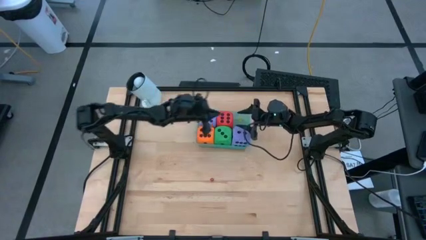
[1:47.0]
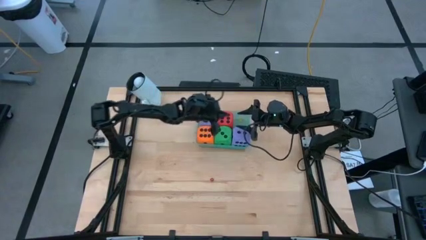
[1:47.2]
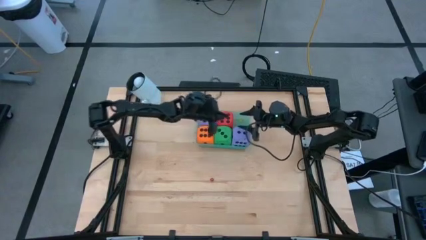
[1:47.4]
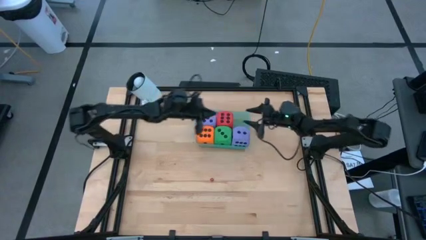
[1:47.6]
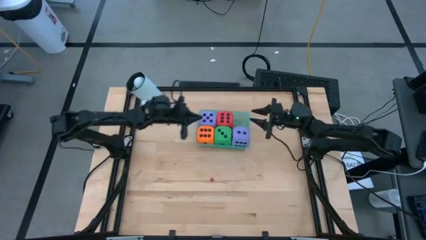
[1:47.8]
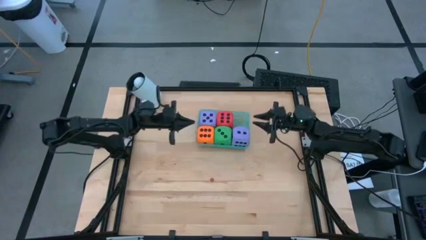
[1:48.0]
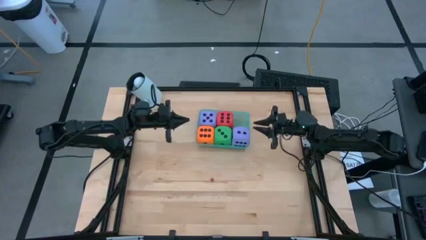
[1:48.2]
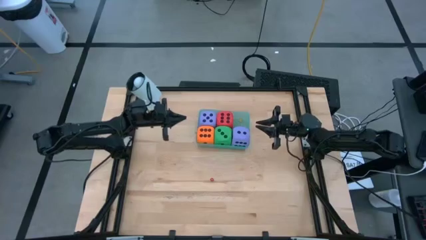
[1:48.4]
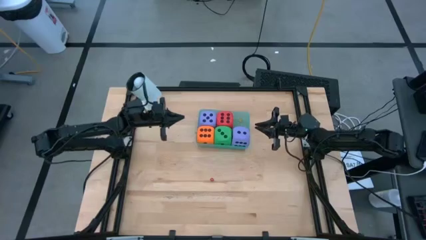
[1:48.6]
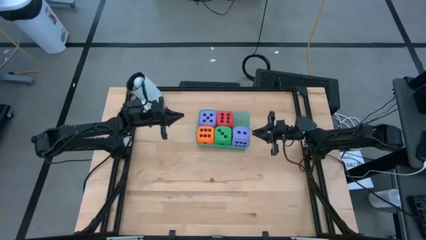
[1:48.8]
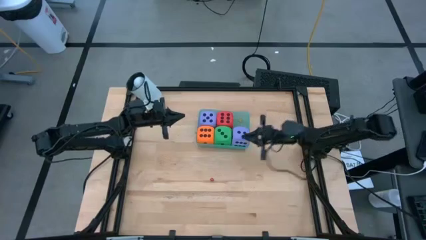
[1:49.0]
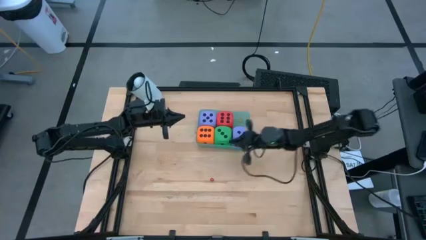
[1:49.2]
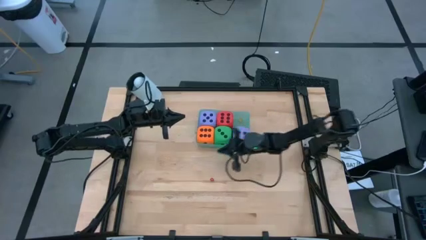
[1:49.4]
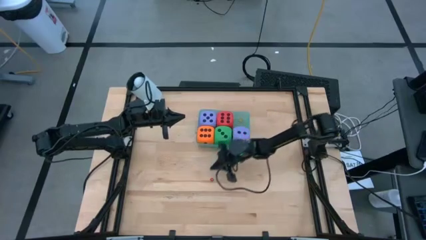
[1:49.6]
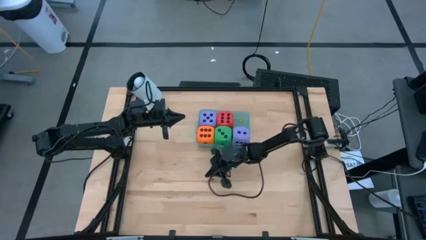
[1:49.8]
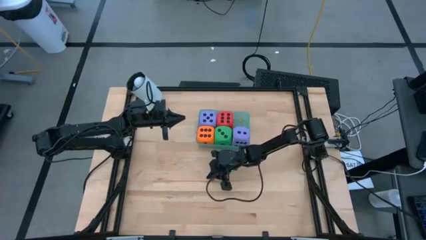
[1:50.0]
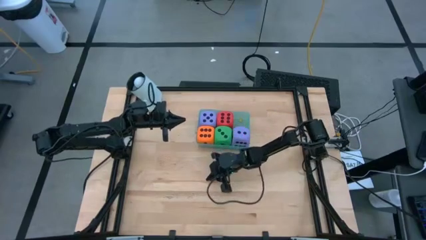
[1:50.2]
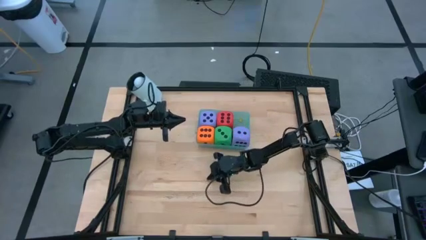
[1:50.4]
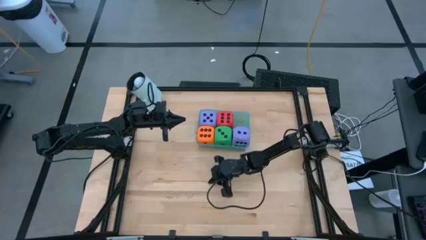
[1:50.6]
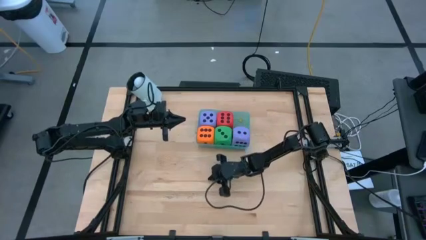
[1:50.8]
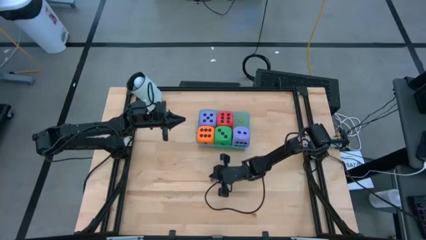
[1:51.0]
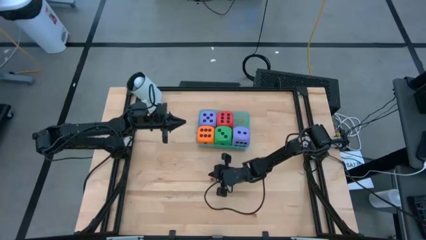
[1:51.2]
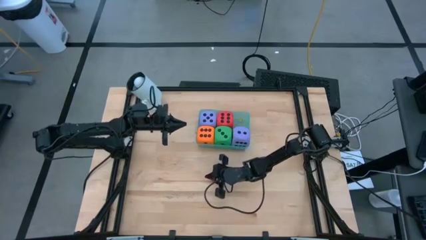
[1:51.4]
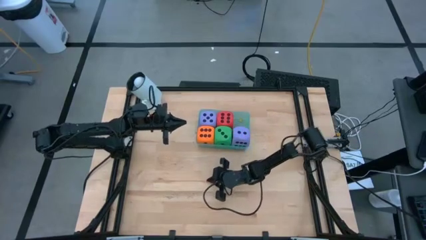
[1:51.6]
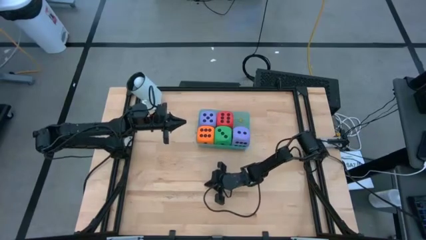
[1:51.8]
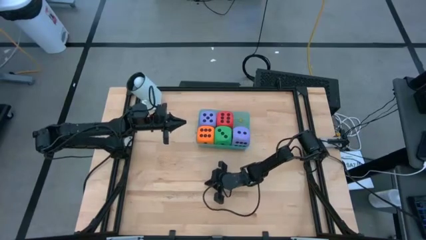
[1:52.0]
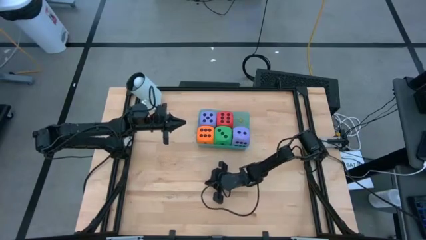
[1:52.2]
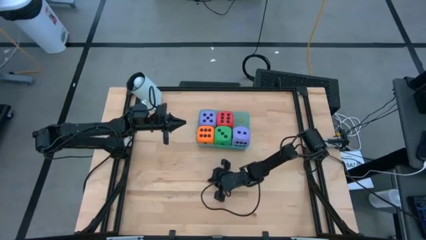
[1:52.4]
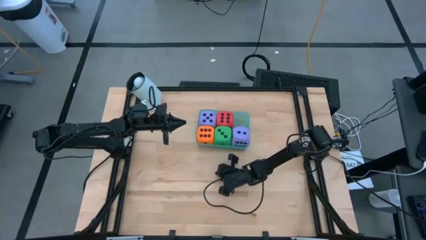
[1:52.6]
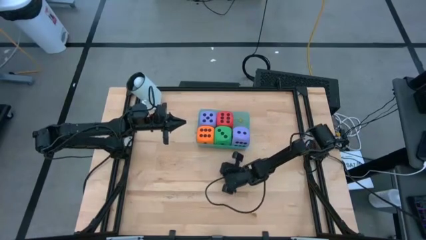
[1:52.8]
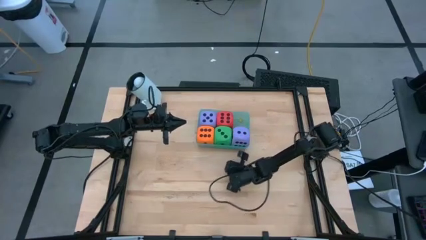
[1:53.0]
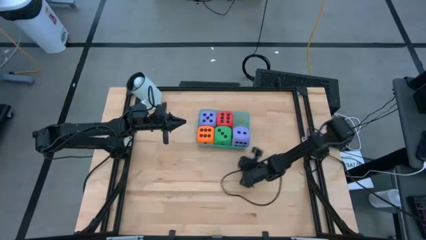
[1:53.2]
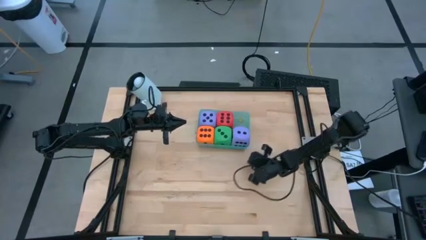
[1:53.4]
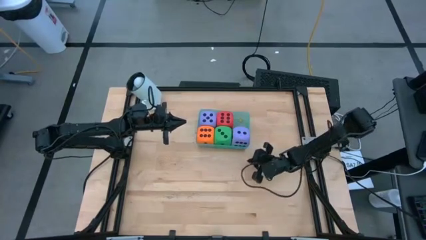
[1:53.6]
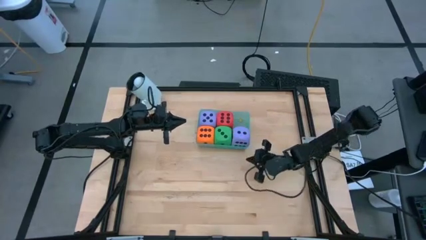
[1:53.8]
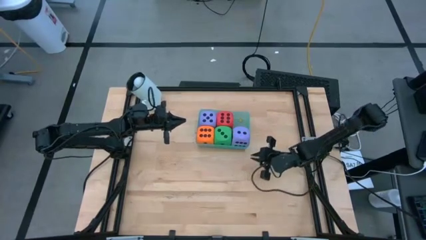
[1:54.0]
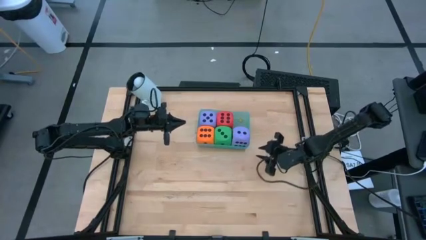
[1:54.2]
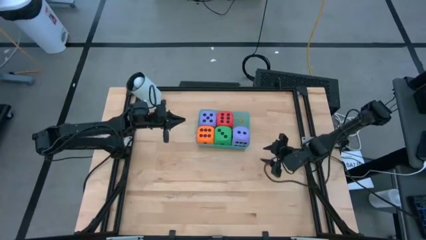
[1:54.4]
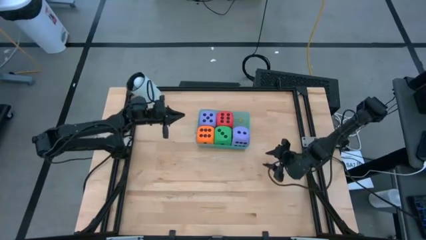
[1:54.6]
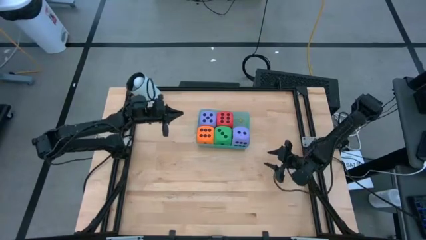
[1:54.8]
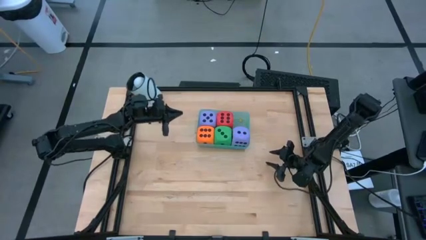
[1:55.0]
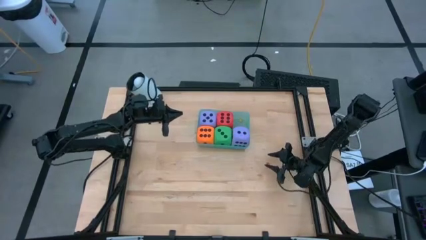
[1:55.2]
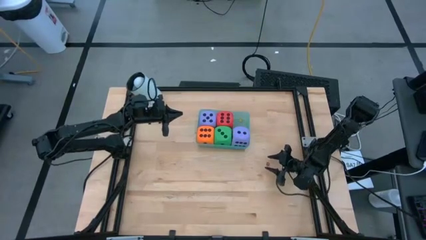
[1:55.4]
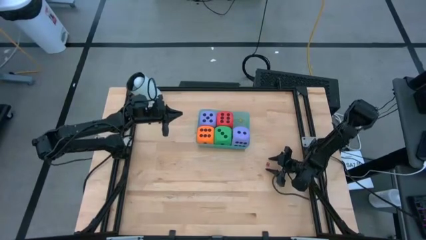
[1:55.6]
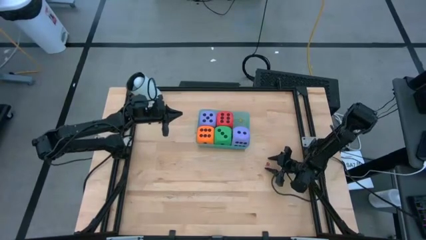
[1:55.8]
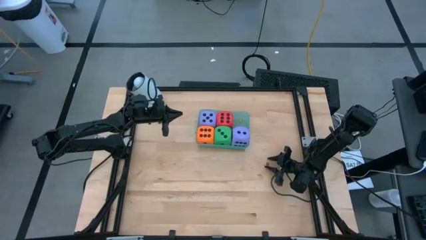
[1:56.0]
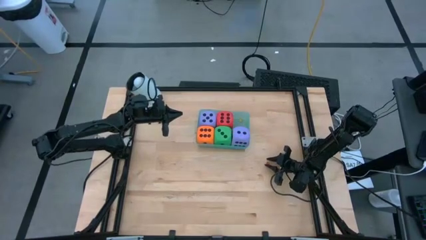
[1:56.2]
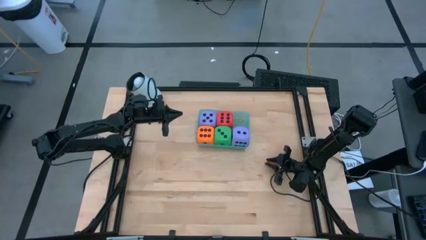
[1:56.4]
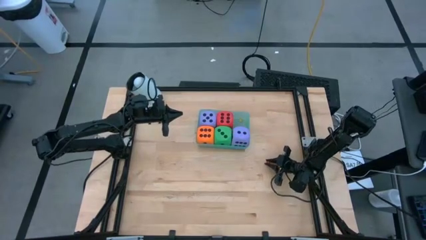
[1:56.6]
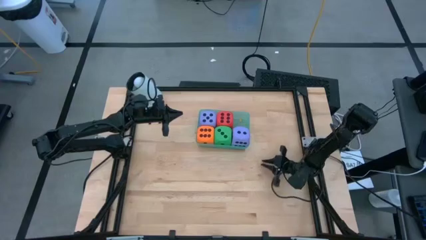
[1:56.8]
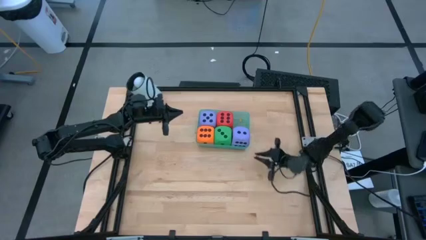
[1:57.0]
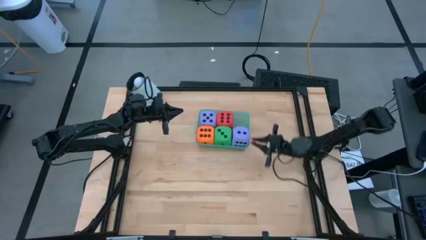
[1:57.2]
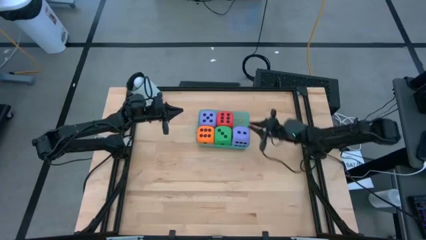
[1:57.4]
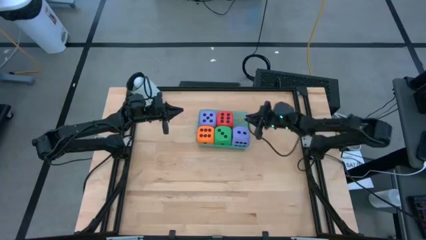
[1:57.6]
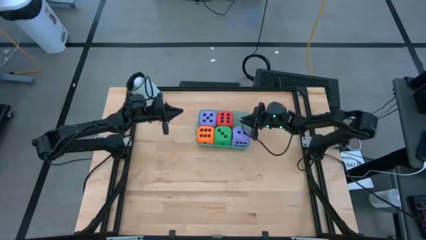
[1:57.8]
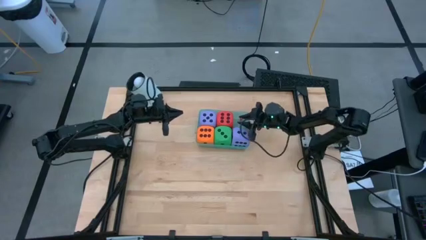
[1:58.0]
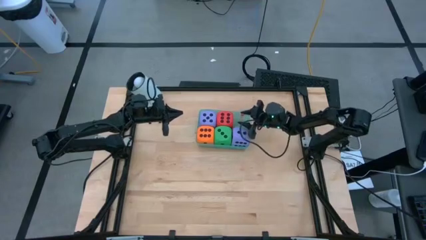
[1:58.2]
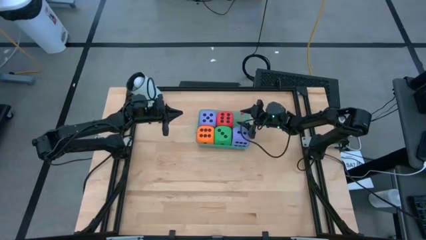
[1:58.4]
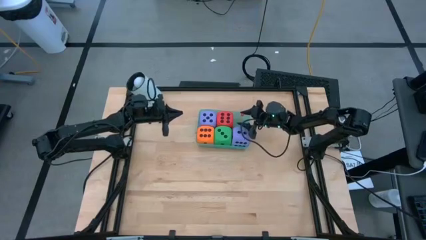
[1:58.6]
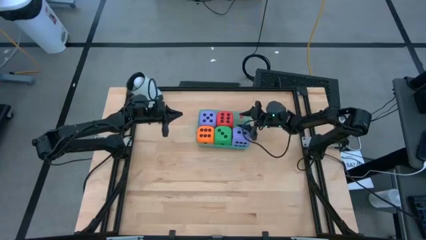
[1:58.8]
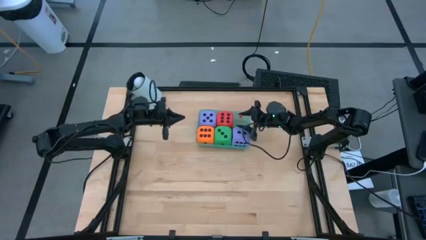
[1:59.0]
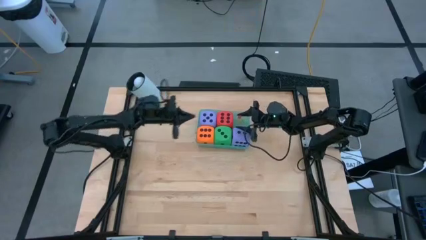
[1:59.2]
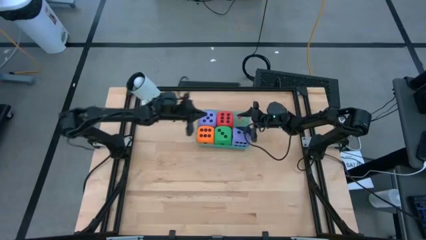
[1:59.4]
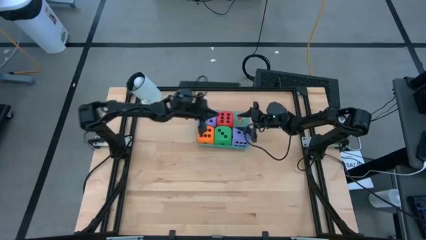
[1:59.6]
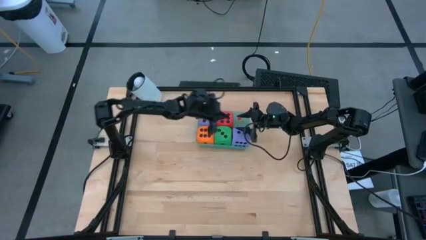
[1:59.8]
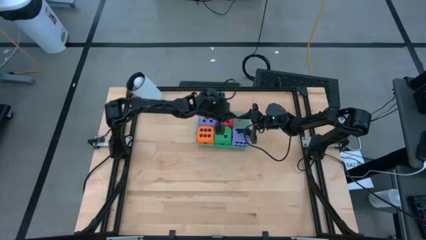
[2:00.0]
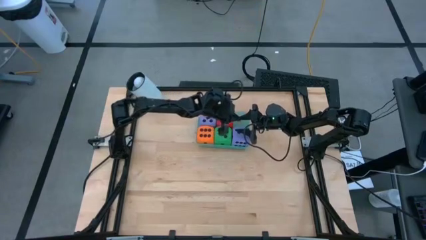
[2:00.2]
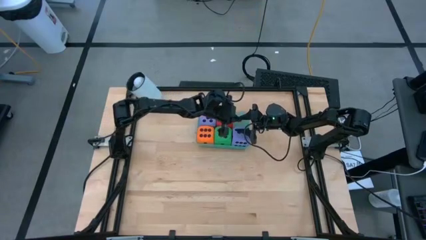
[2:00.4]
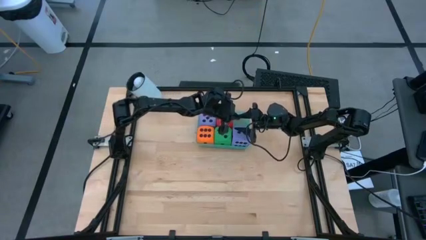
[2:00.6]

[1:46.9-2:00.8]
Task: Pick & Place Dice
Put the small red die into the green bin

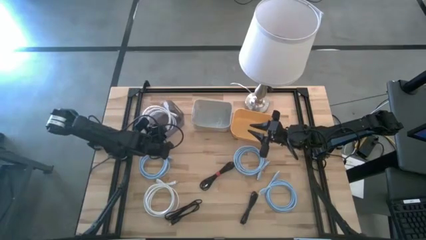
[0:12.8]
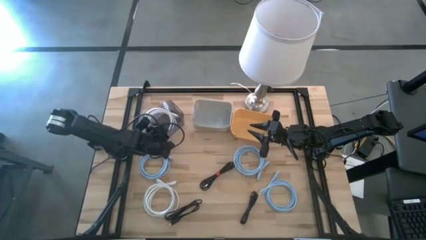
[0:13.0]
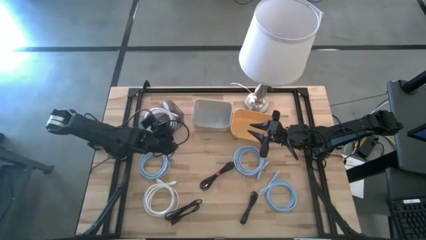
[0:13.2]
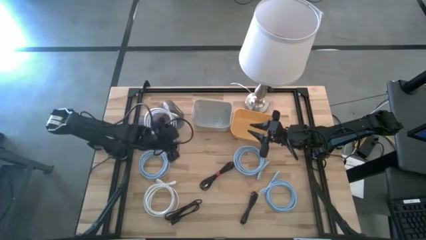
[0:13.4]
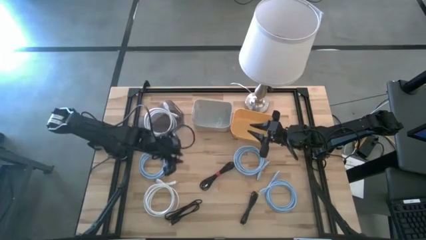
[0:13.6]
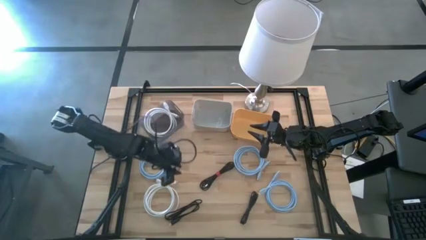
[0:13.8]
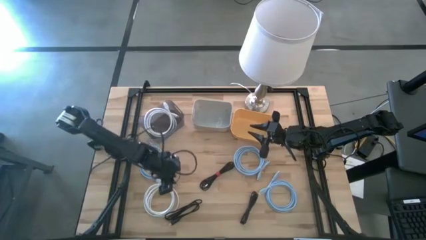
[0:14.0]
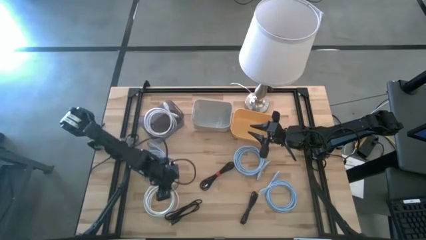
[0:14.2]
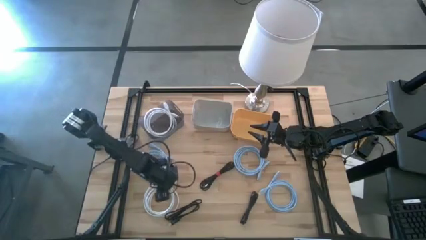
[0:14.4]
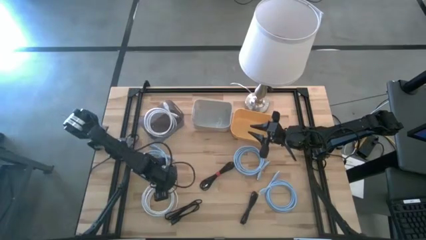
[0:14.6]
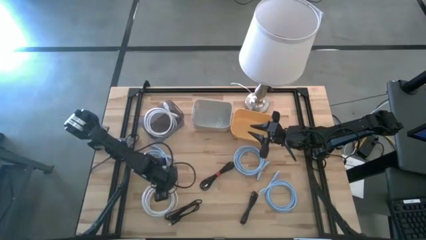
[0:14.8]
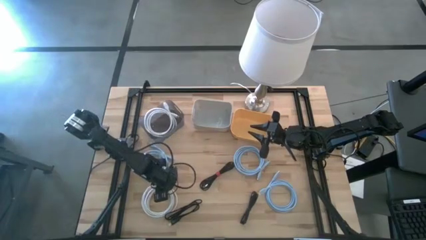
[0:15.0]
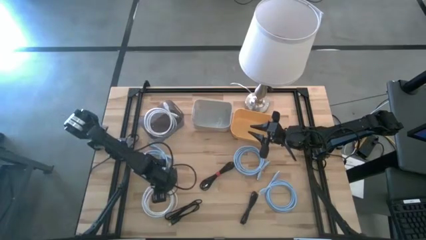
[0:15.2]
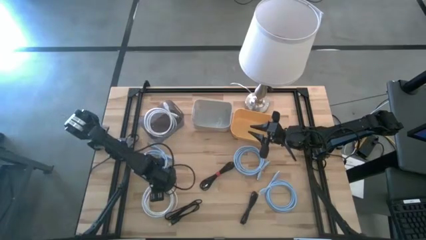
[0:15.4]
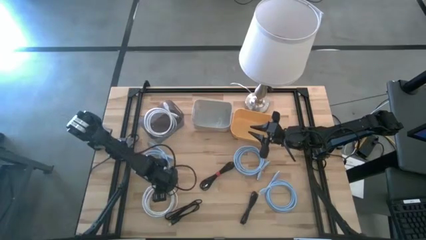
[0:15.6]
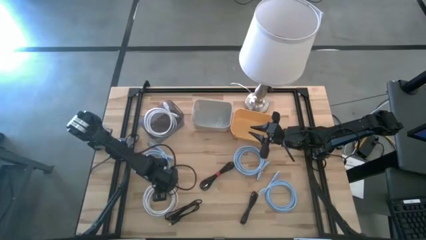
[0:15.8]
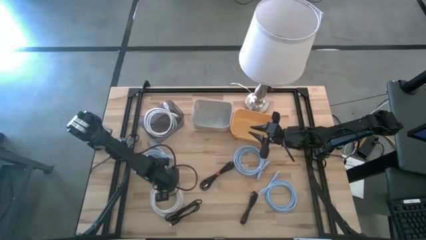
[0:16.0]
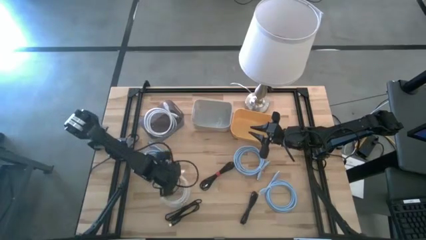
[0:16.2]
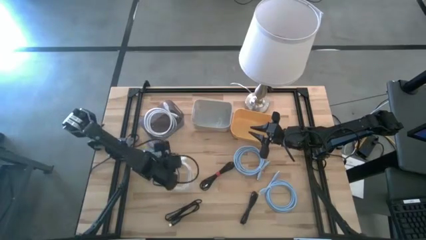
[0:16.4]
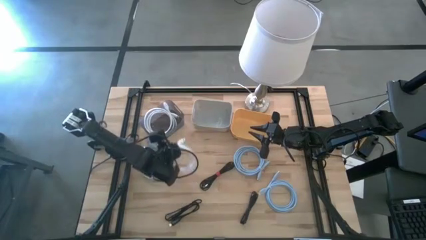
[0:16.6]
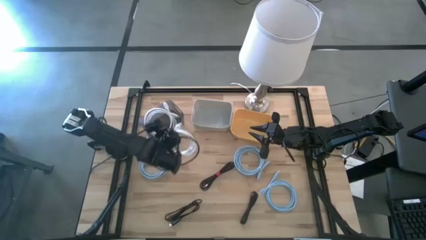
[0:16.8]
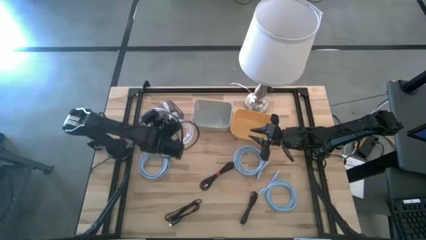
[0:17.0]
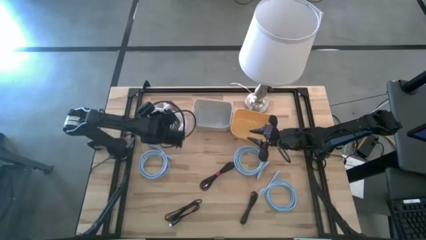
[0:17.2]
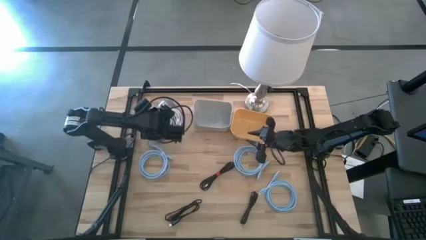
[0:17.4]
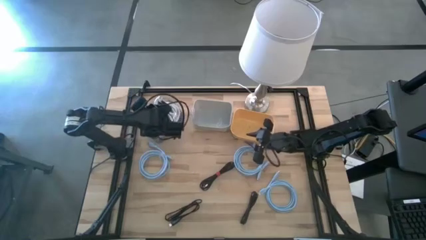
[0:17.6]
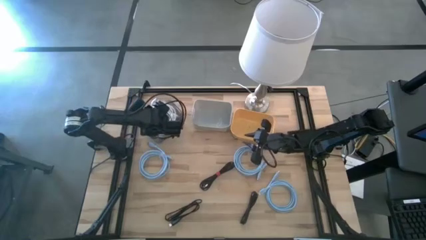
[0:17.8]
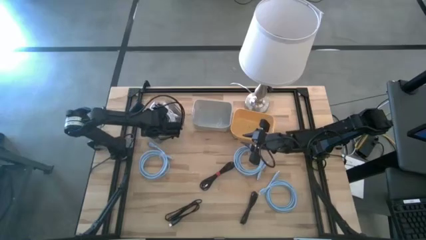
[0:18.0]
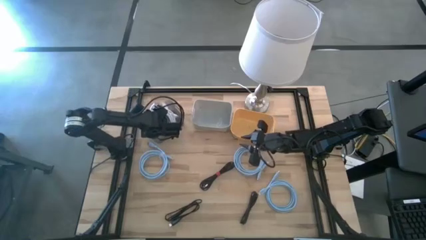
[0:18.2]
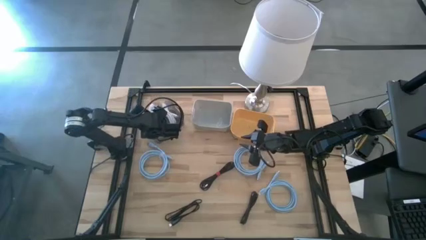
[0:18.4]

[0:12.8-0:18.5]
Task: Pick & Place USB Port
Put the white HDMI cable into the black bin
